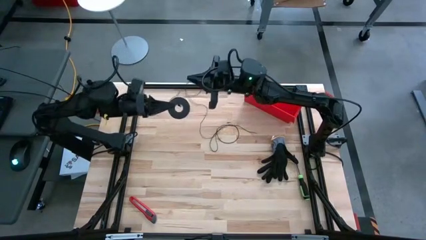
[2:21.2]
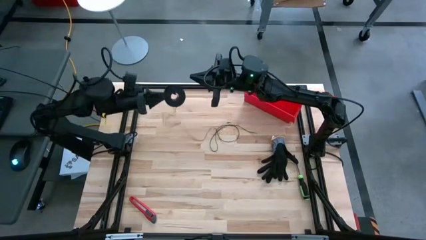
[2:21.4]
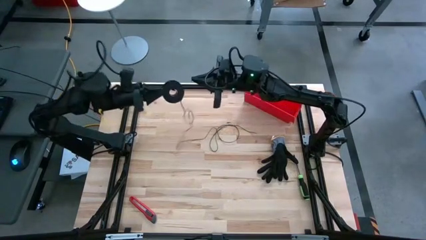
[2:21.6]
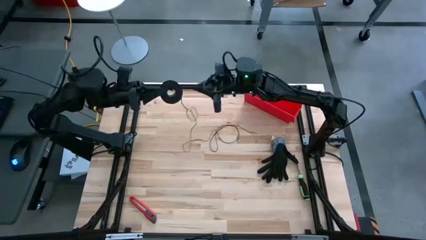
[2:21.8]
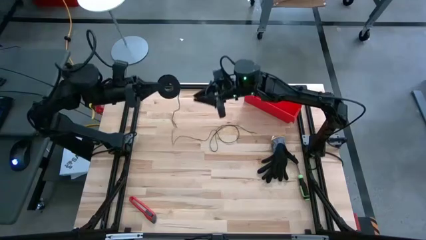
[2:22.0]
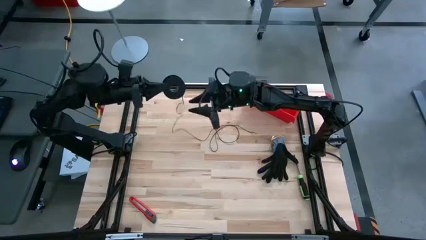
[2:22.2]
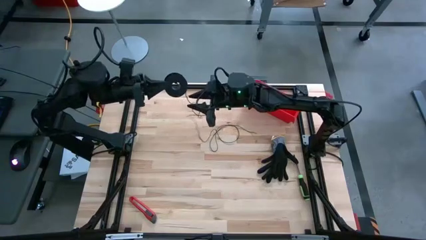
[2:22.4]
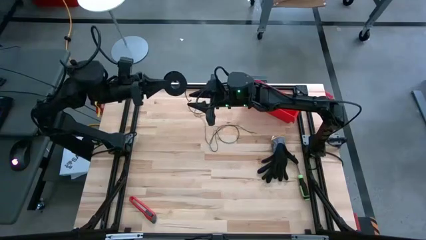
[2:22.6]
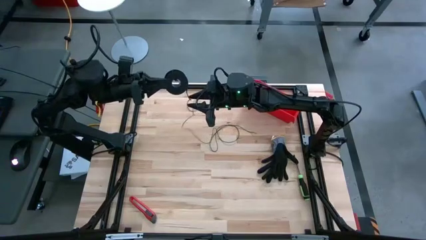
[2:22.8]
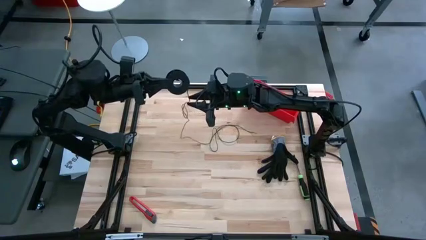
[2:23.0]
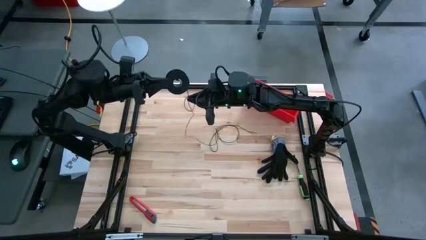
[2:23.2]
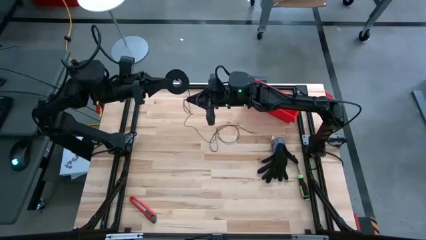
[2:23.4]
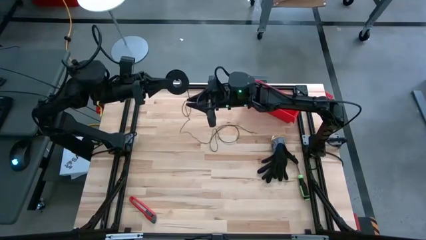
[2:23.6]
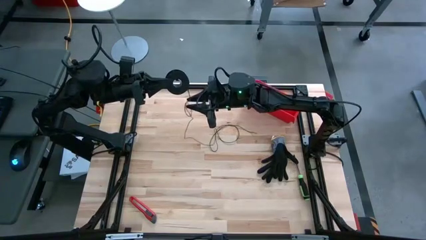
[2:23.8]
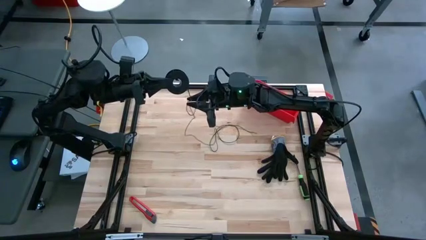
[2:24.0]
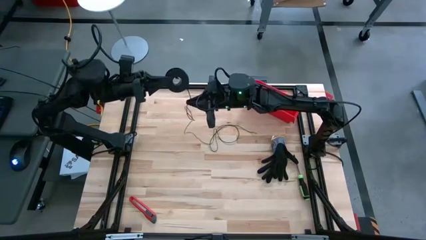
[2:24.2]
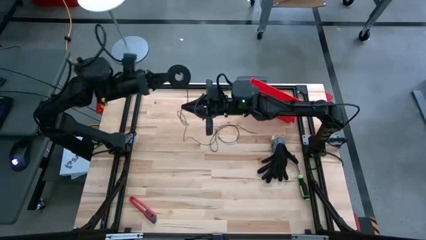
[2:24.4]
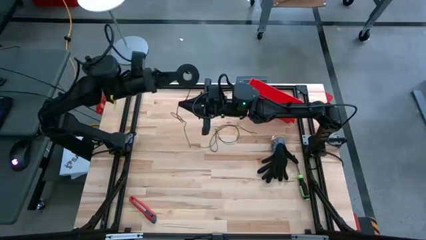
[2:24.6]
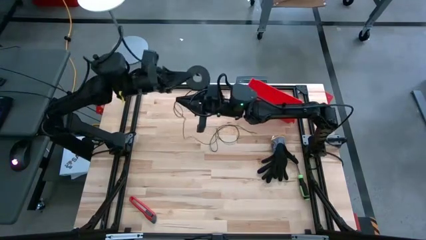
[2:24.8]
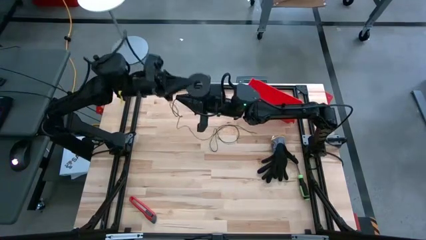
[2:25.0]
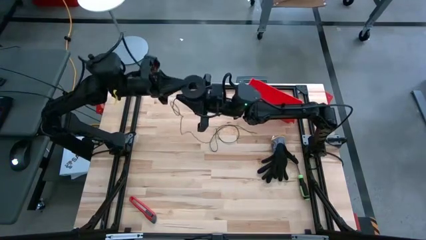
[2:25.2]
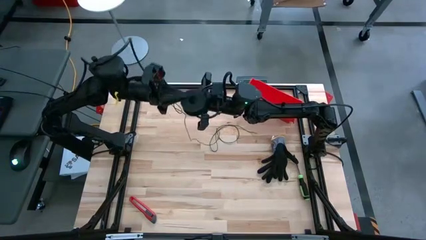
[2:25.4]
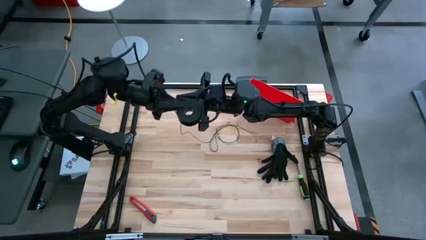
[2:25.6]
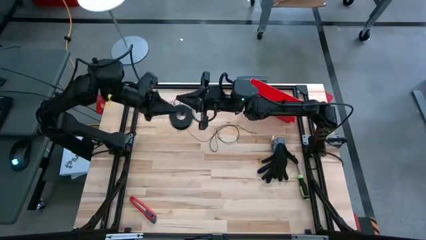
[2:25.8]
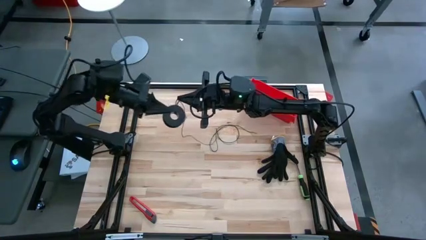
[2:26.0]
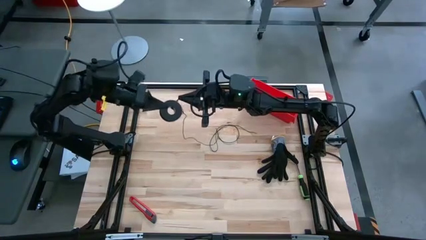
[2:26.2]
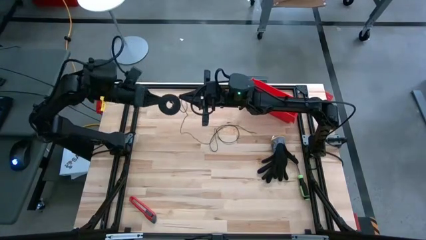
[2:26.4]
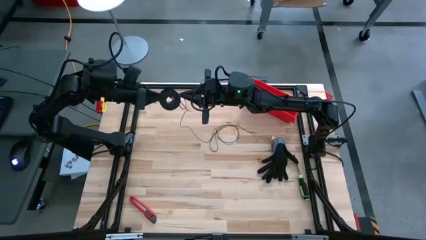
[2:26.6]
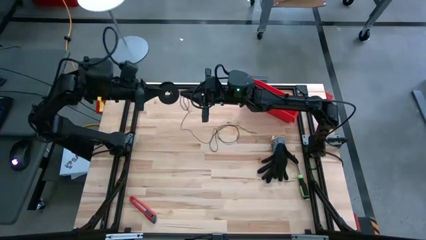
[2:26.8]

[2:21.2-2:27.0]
Task: Coil cords
Coil the black wire on the spool

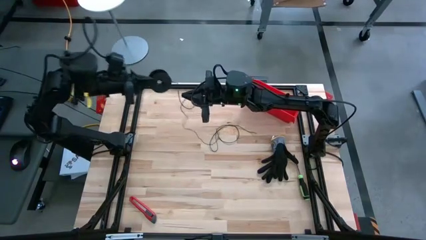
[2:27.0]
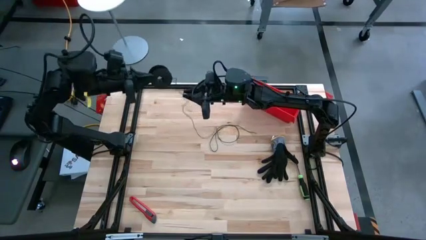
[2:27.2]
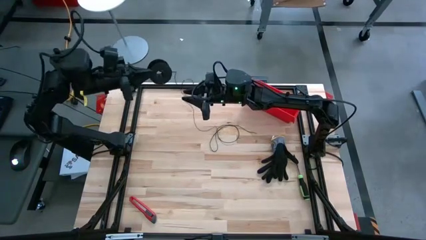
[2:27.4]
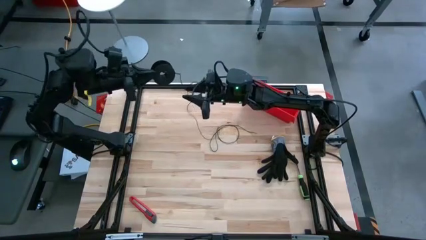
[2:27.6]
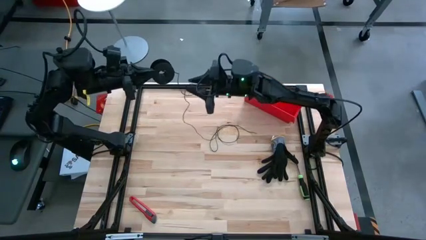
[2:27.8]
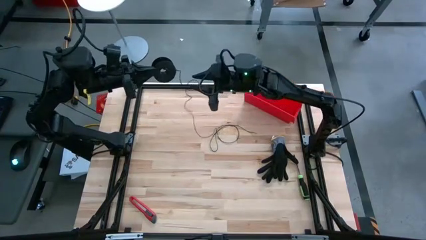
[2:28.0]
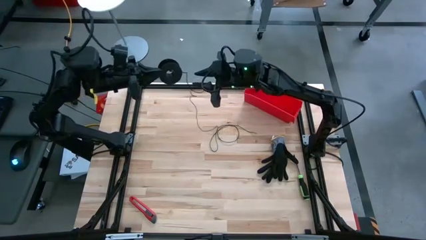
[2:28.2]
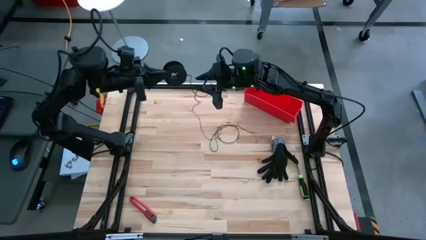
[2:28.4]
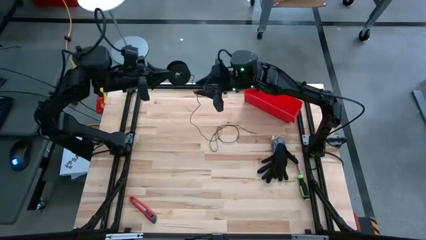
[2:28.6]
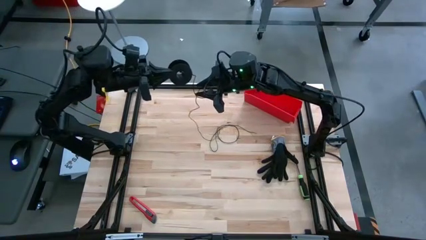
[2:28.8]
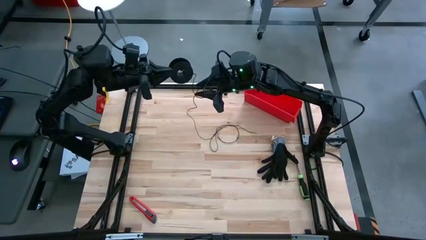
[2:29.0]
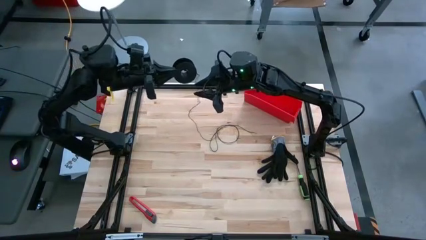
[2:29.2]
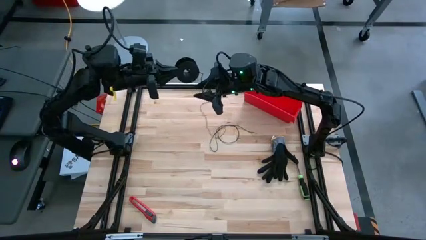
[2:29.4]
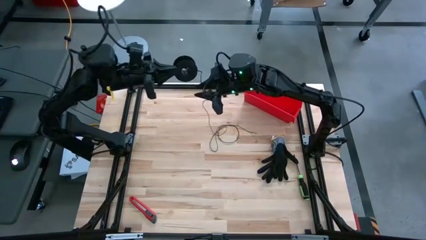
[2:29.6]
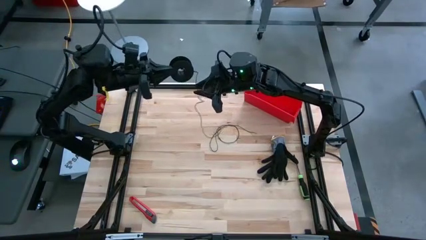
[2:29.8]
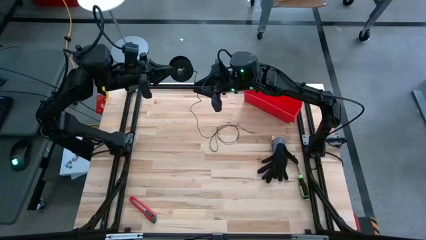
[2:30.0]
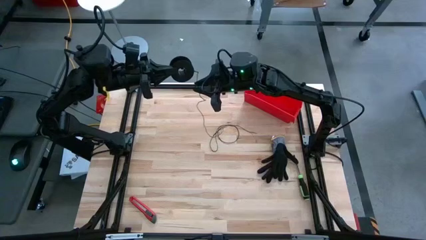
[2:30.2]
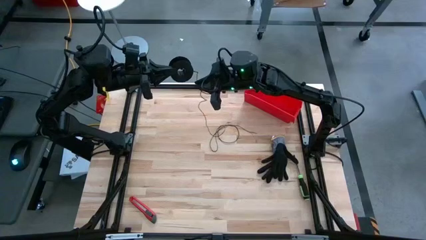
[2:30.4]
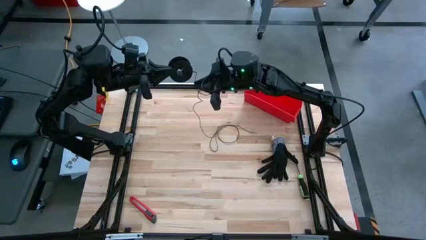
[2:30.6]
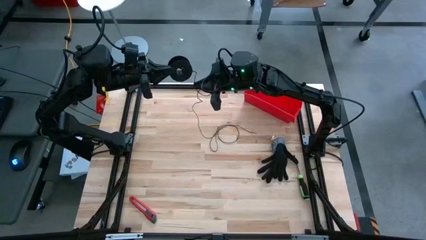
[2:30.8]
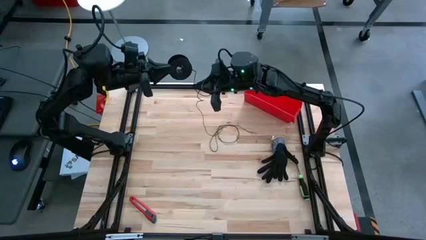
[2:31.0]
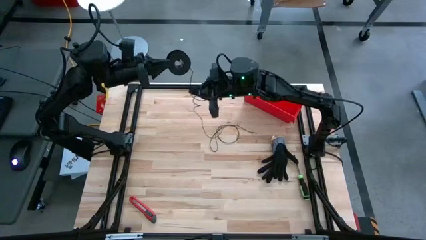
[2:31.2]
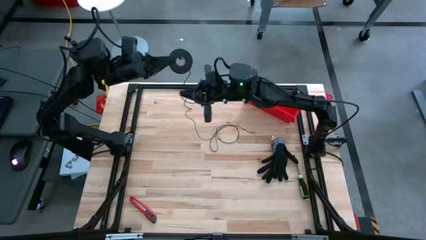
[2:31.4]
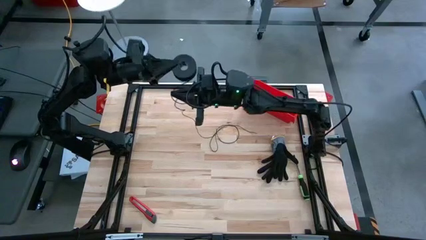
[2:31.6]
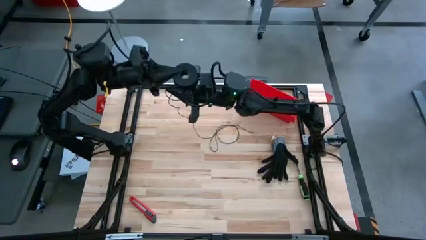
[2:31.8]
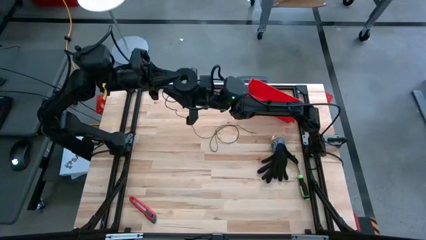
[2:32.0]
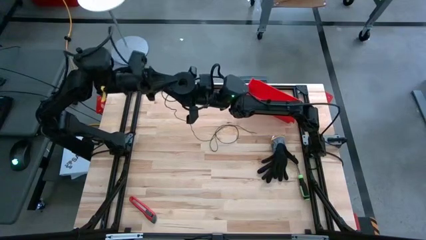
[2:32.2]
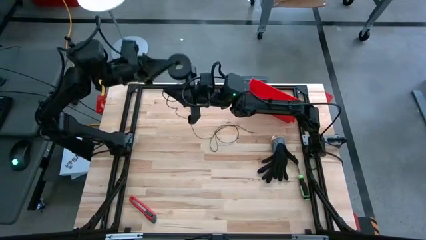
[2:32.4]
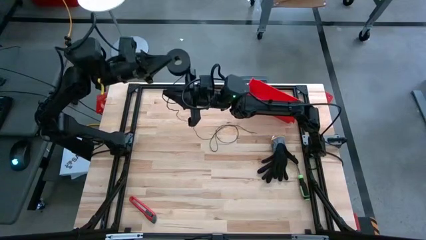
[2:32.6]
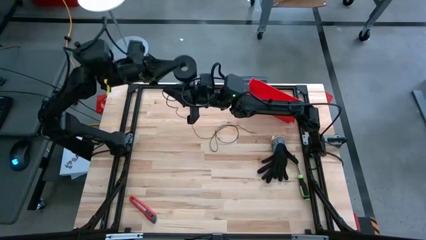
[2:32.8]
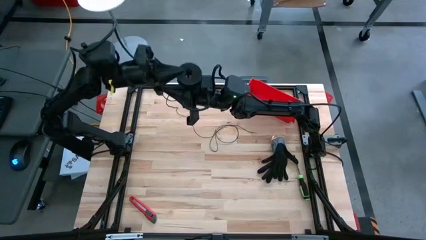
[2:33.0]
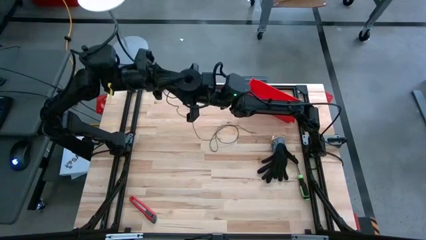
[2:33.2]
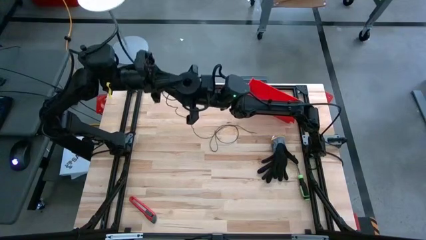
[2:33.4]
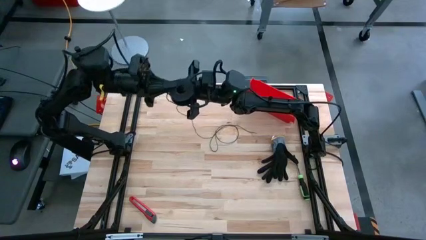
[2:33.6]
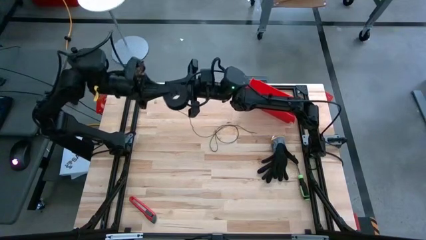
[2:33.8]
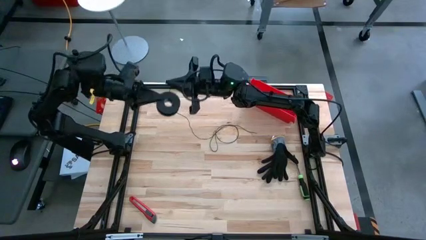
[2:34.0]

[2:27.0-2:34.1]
Coil the black wire on the spool

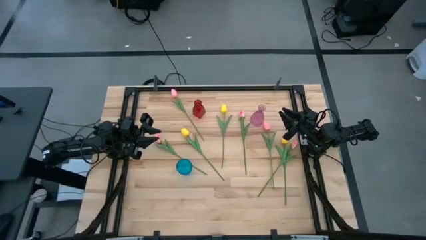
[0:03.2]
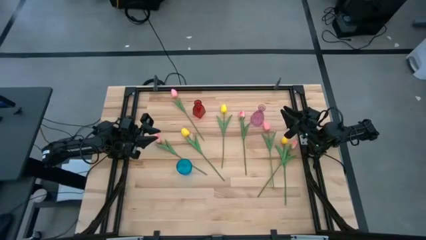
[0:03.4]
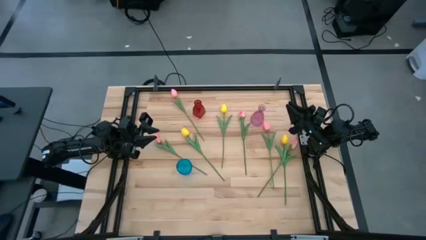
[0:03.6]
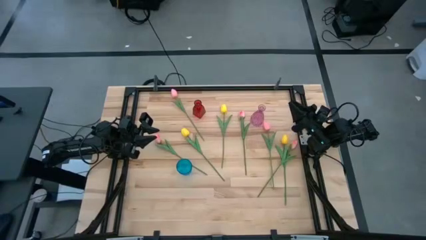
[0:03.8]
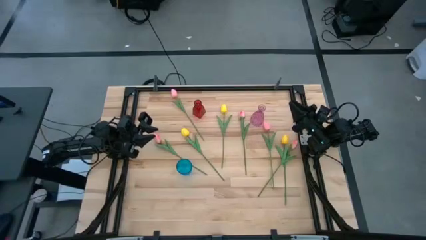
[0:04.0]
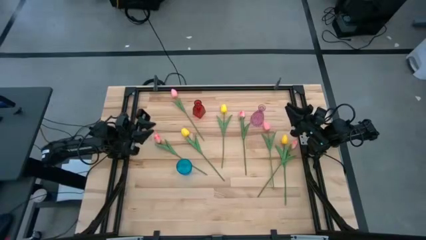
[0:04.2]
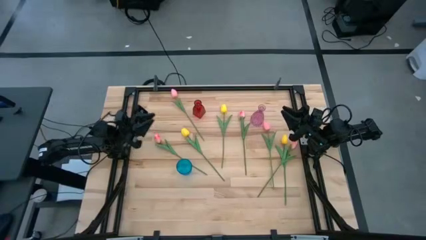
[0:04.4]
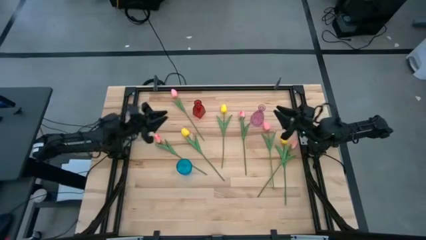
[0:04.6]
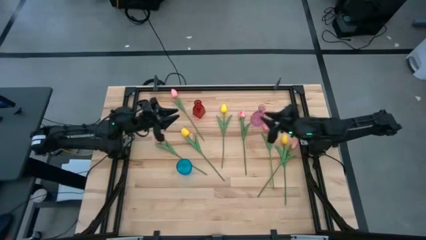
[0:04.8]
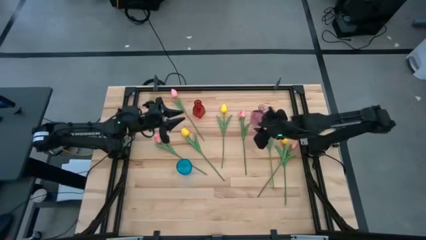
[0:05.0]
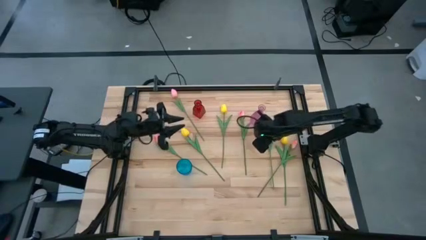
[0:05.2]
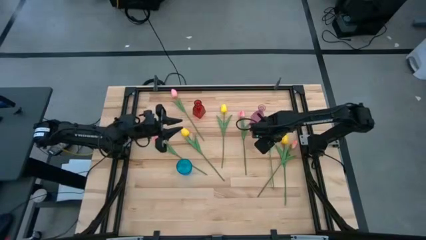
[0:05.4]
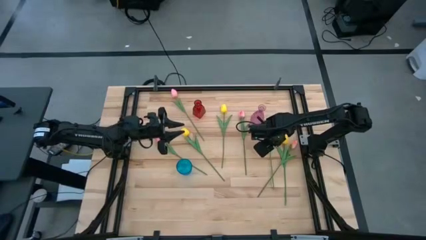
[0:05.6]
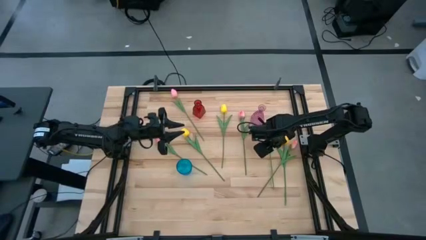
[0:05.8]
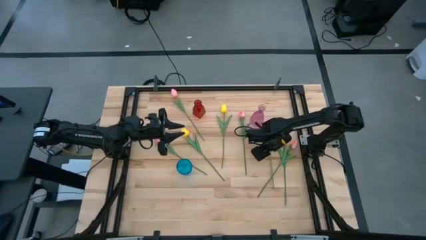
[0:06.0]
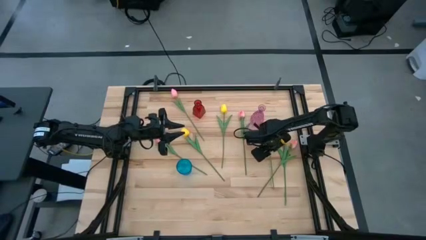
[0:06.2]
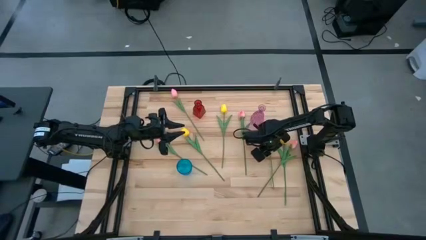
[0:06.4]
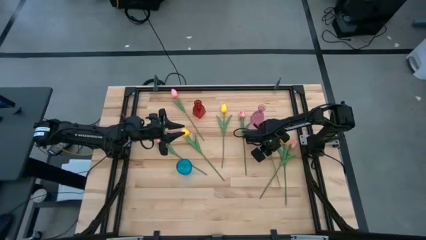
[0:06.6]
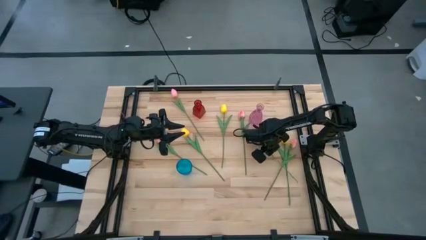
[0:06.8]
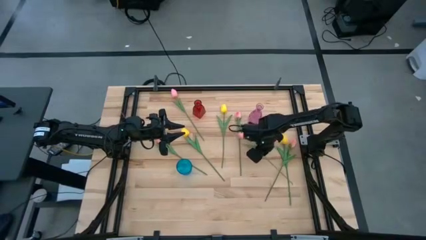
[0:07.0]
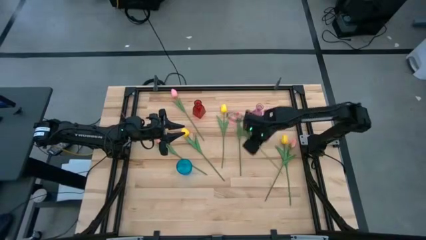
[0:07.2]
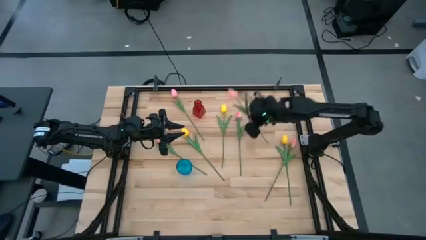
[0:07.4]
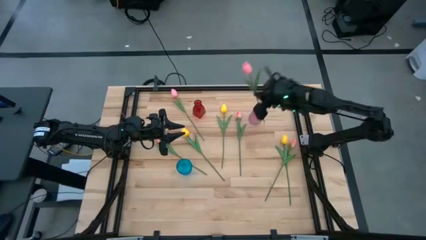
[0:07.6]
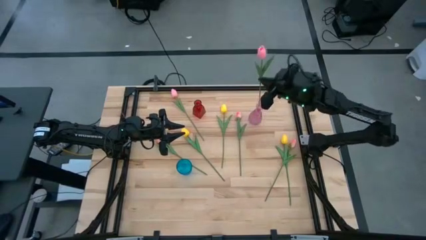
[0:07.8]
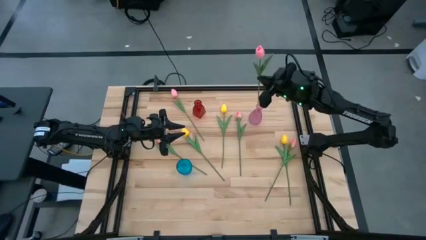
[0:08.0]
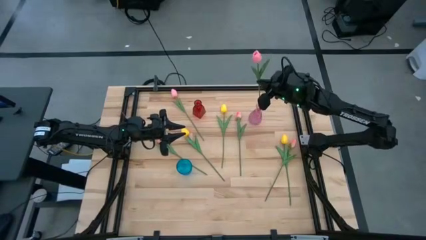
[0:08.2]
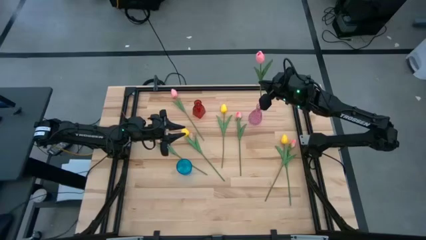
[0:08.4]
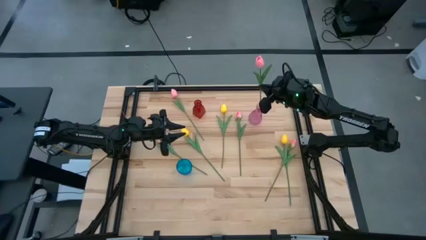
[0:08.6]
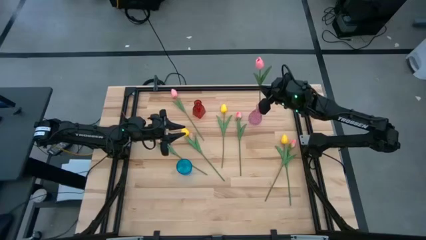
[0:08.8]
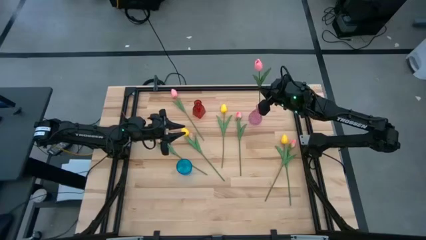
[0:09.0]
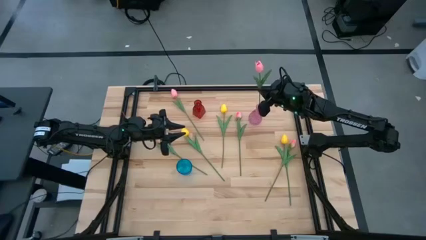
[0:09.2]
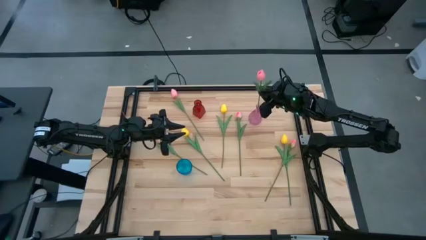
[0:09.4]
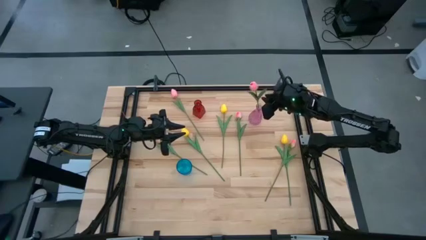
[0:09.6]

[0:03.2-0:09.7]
Task: Sort flowers into vase by color
Put the right pink tulip into the violet flower vase
